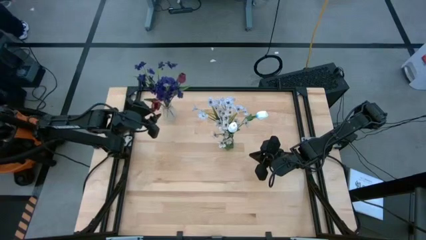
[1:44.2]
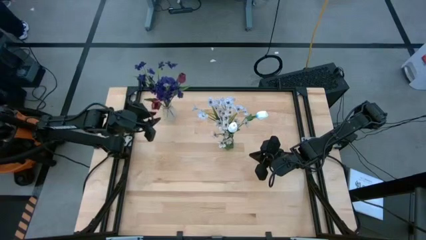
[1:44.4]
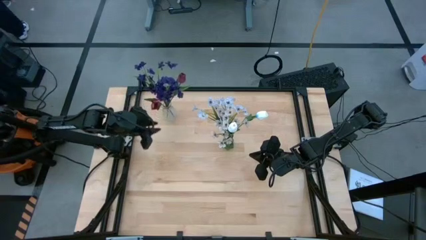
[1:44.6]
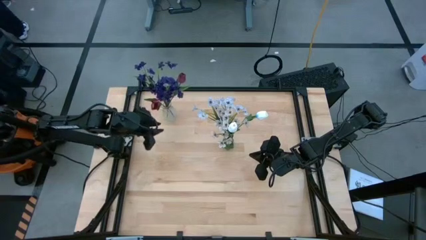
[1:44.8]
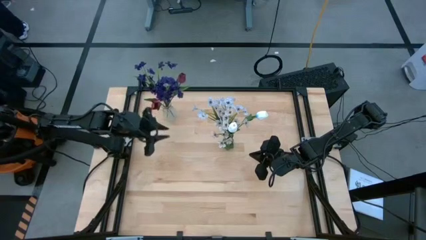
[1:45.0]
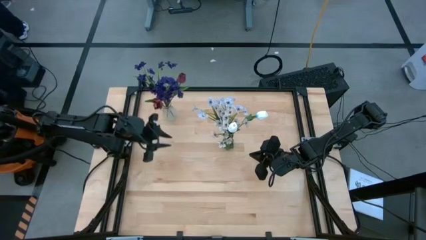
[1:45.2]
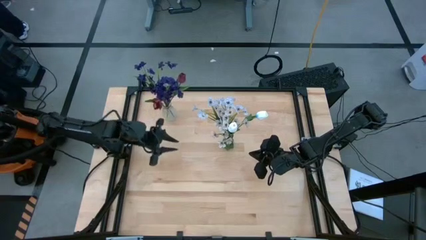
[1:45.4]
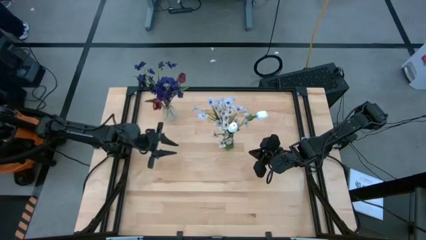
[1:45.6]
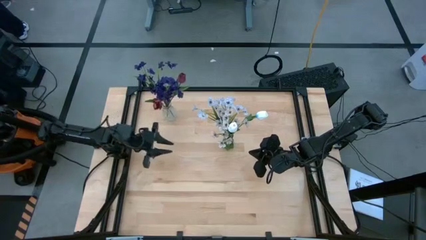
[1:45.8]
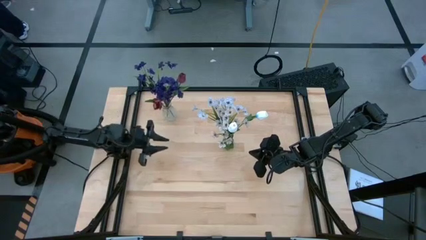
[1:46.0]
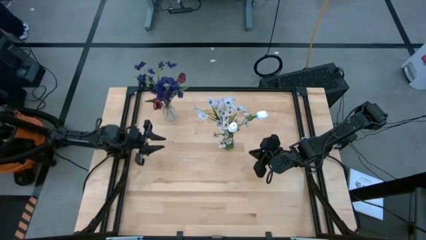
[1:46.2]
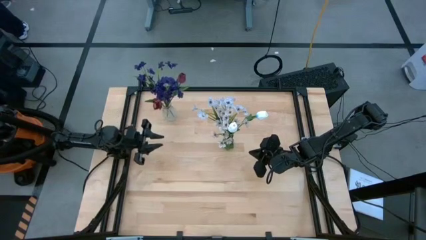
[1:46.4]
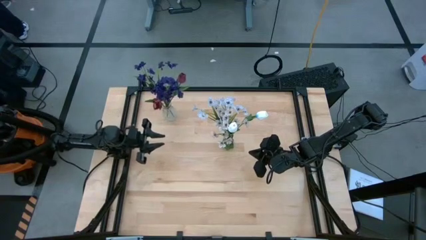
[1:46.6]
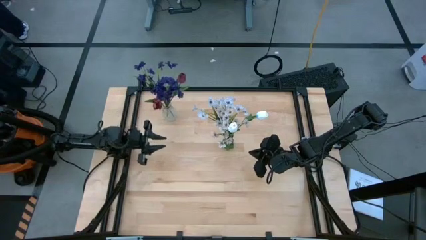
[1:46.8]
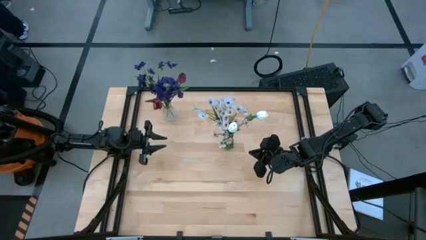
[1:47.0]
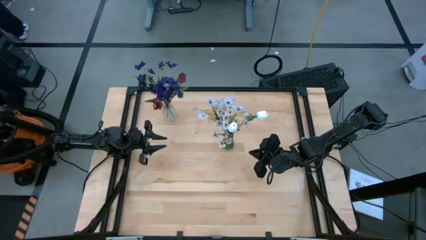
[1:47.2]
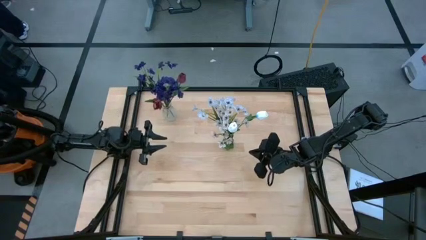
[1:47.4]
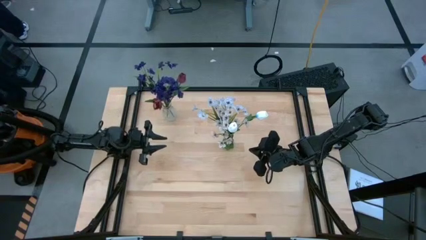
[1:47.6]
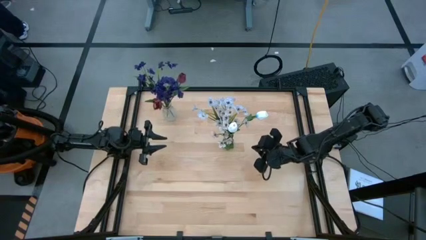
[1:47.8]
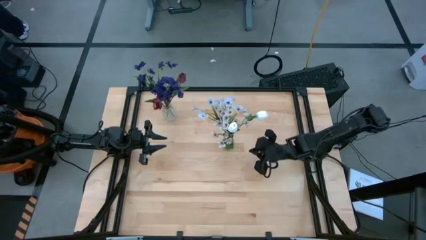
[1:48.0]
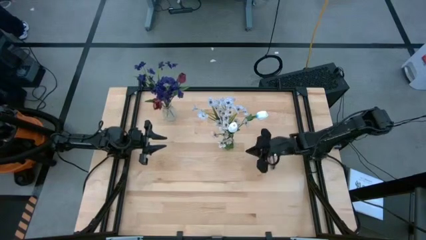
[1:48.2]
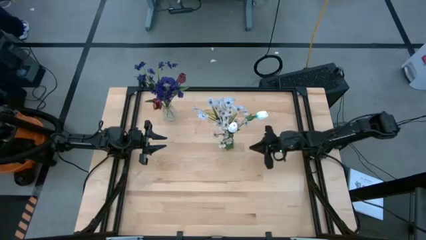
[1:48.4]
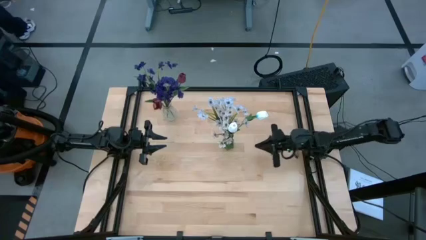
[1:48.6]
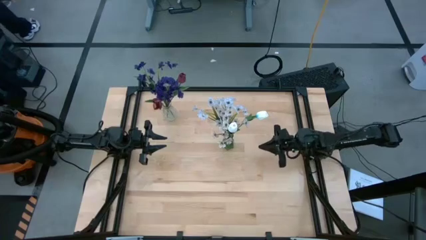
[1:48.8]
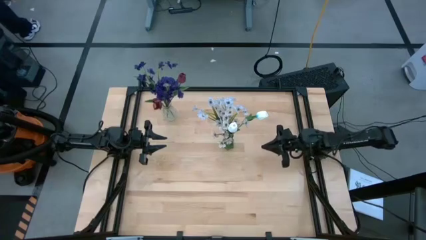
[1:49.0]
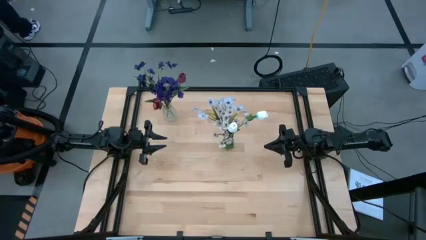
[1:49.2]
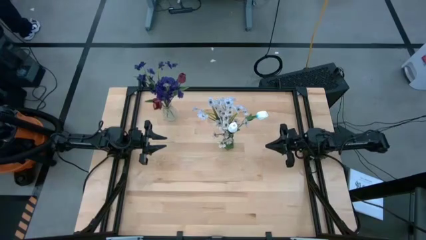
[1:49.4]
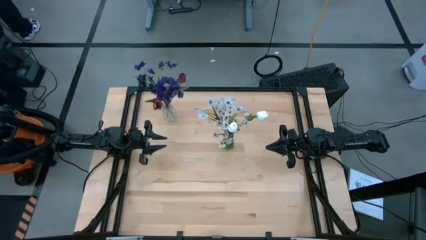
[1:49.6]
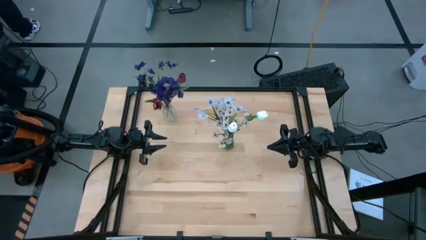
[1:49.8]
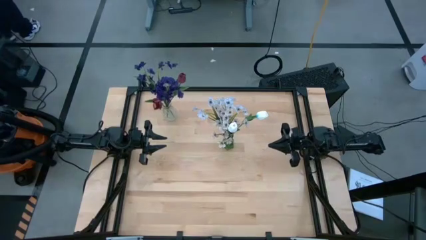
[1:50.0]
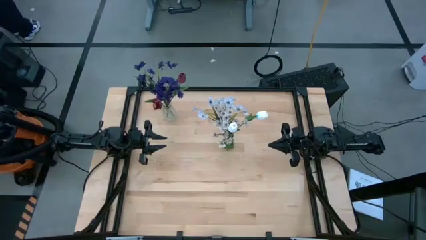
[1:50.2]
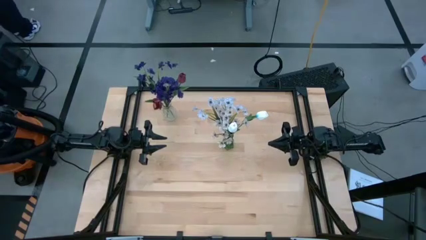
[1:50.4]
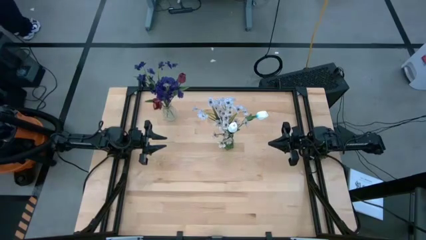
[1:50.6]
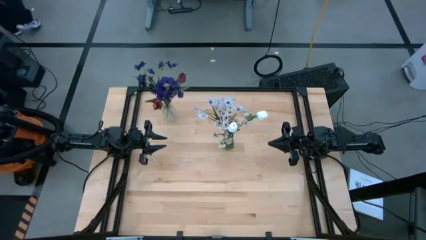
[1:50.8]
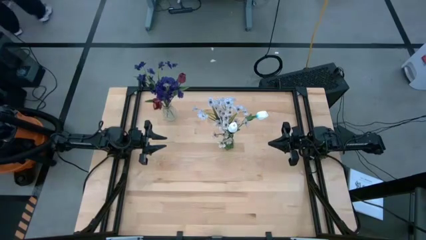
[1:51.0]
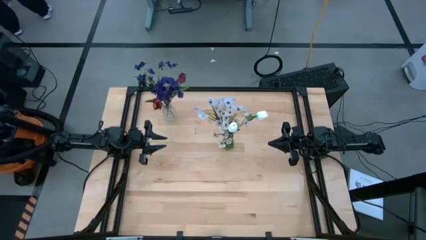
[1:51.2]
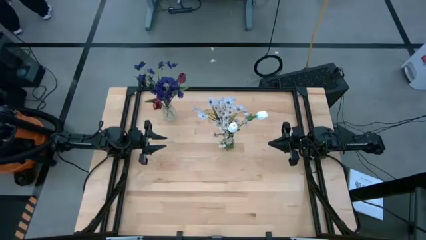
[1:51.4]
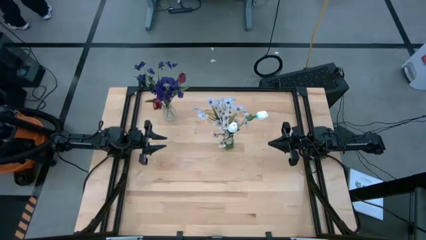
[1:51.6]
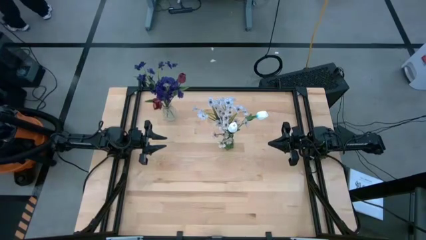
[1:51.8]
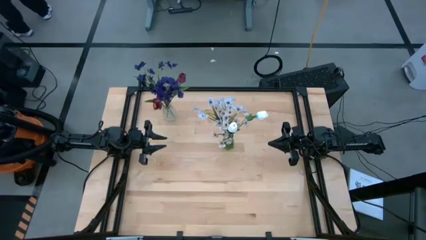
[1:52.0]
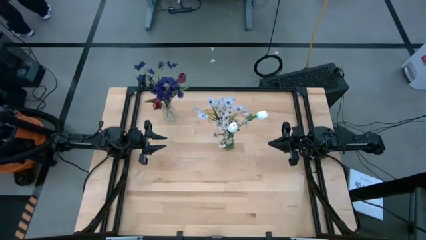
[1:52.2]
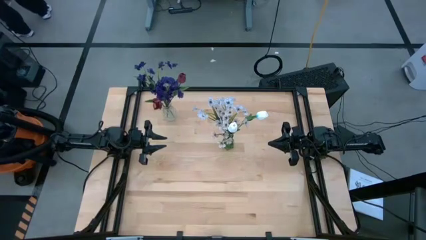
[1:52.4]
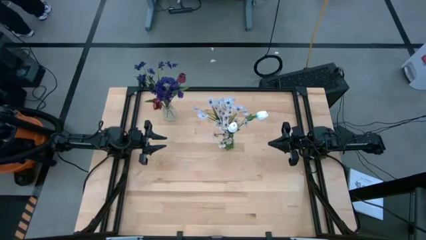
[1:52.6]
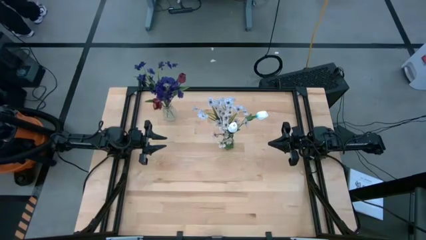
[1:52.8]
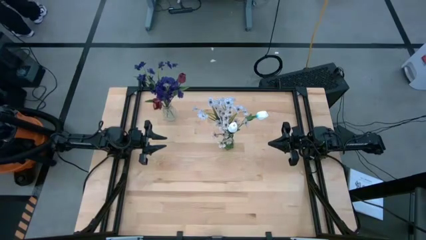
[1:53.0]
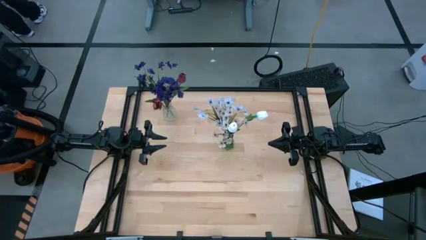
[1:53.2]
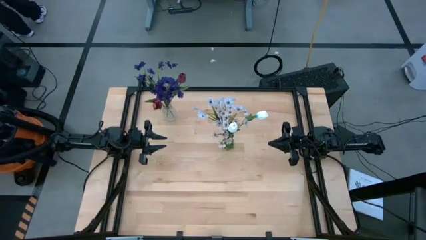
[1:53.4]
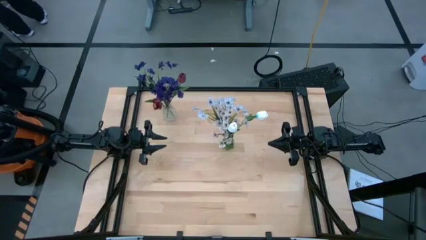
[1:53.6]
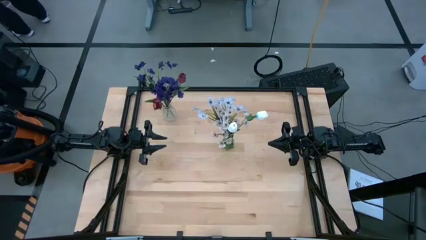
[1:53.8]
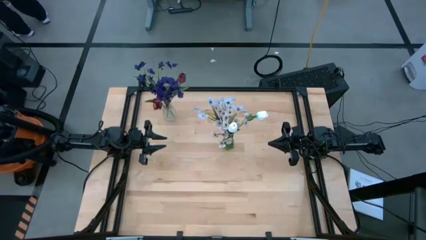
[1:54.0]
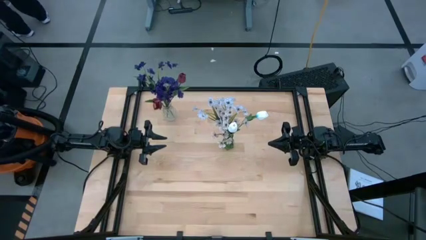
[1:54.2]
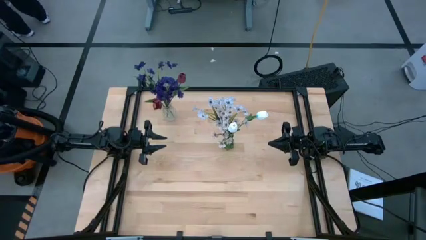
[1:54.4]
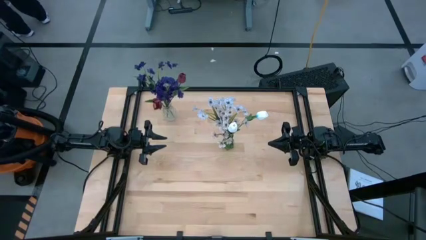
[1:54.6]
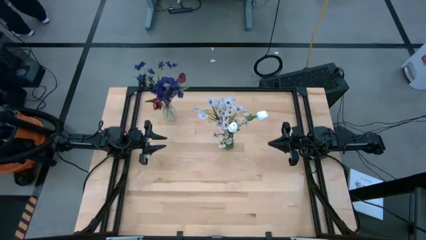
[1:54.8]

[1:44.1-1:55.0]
Task: Sort flowers into vase by color
Return to Home Position

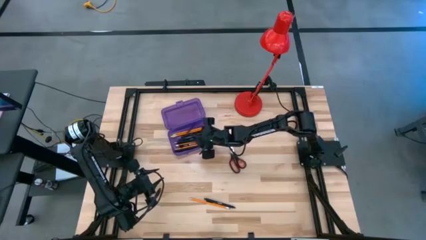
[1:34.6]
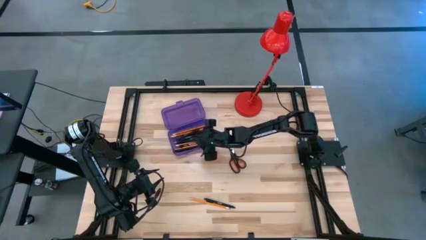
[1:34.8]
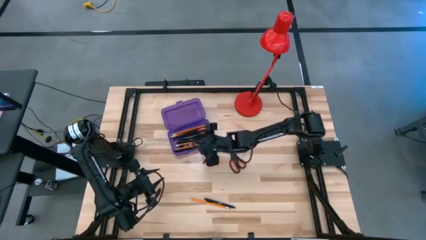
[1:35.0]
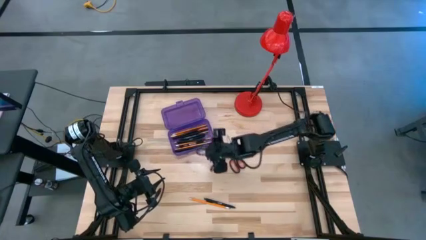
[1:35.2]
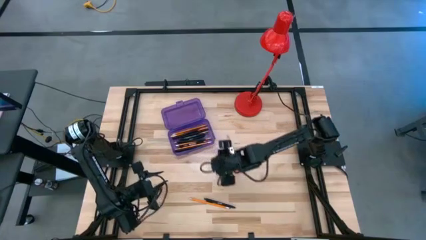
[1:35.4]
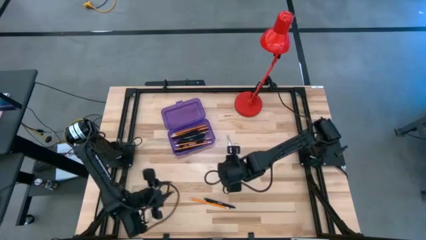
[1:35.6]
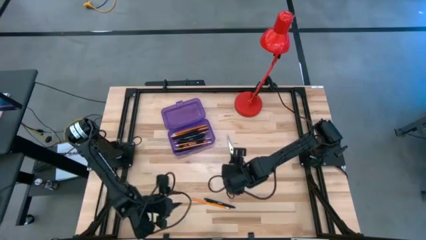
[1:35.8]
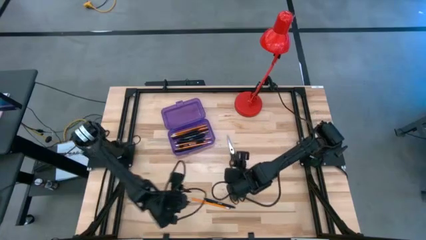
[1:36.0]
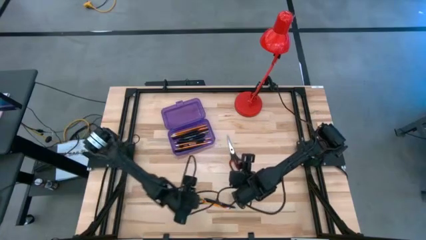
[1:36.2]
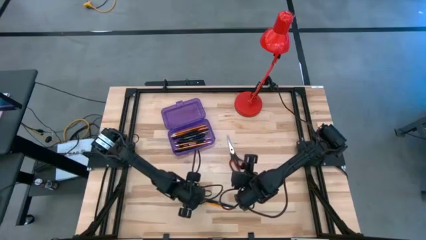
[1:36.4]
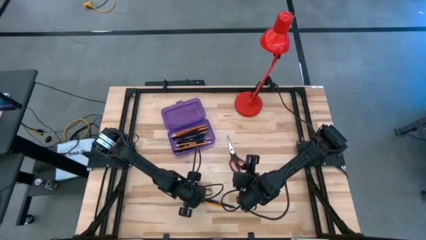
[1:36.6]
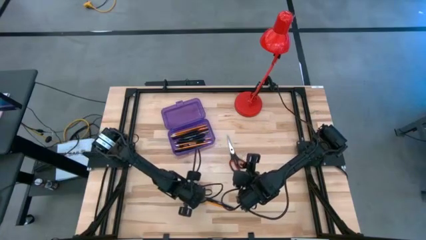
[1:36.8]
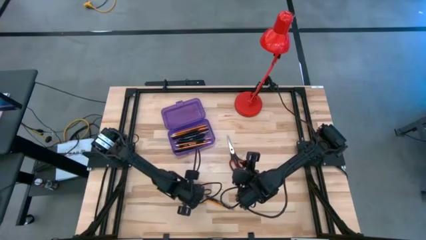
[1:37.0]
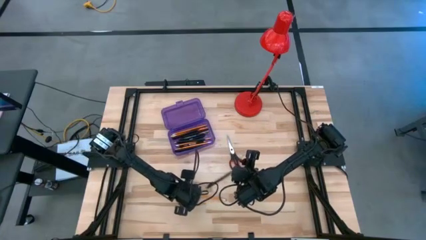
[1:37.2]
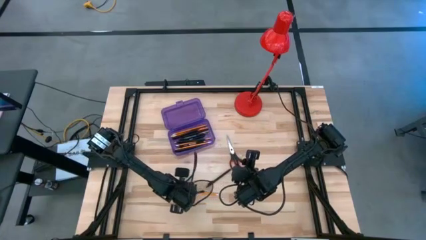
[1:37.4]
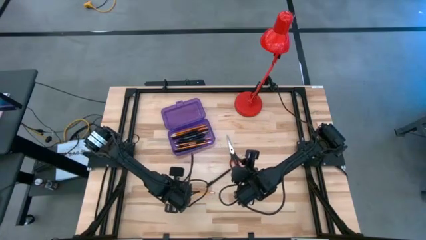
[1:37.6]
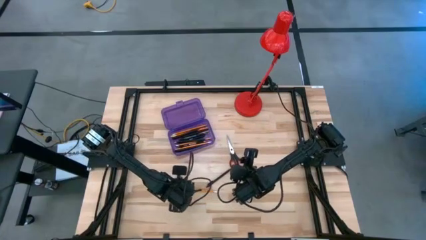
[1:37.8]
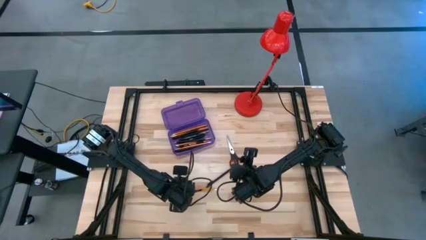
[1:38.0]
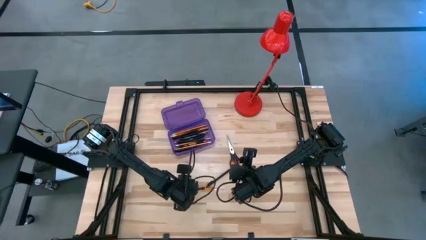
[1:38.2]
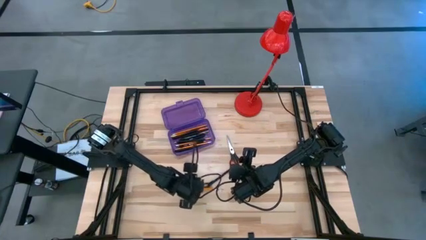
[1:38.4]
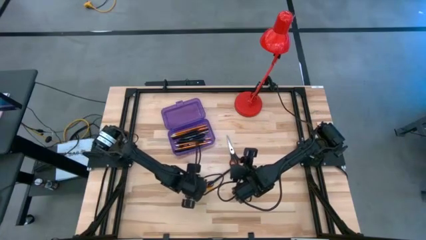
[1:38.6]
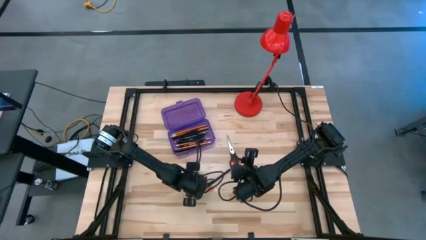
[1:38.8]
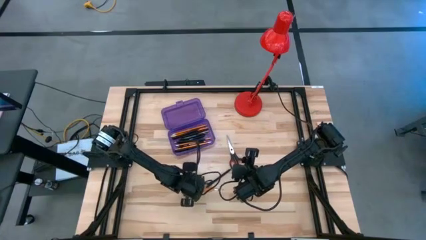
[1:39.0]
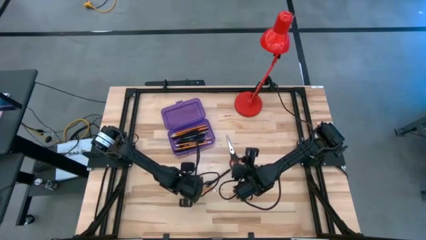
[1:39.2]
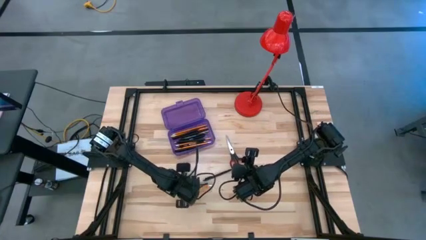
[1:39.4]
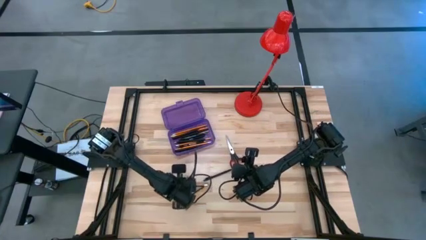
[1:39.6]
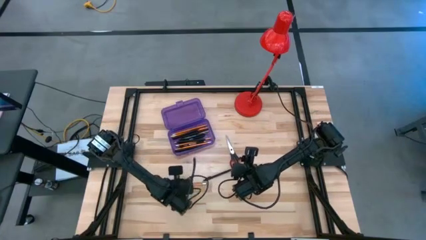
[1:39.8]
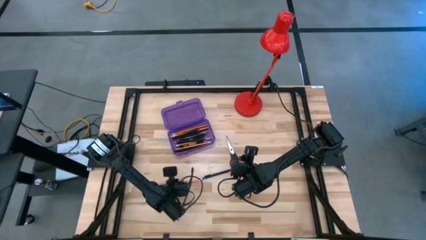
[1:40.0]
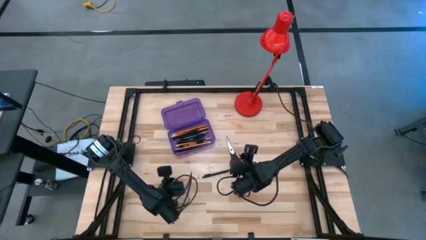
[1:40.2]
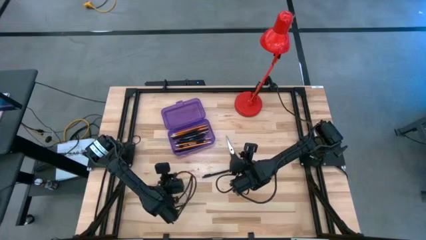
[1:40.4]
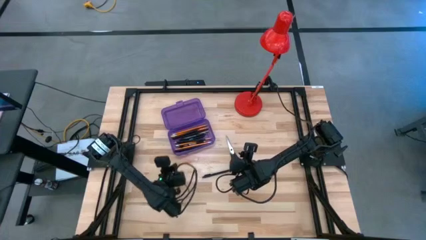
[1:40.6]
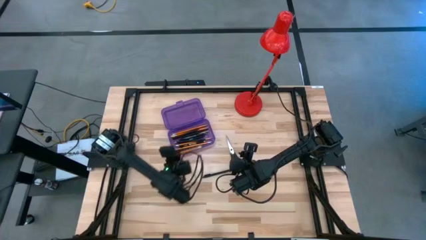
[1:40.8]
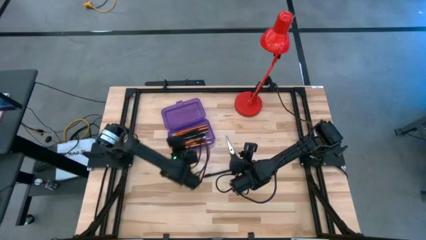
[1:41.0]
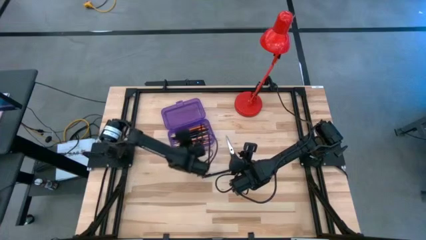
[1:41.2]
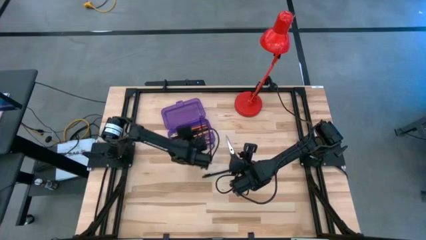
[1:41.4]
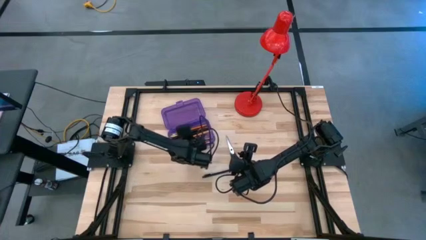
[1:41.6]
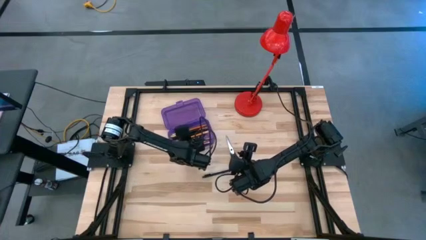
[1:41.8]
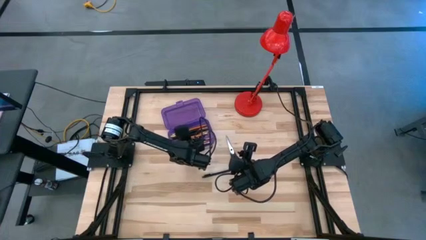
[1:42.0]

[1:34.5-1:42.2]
Task: Pick & place school supplies into a supply box
Put the yellow pencil into the purple supply box
